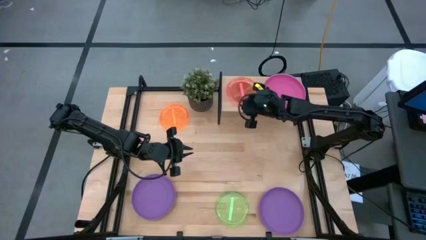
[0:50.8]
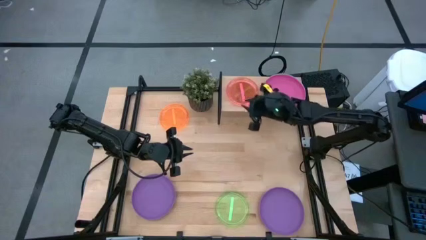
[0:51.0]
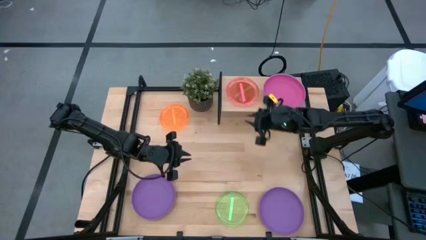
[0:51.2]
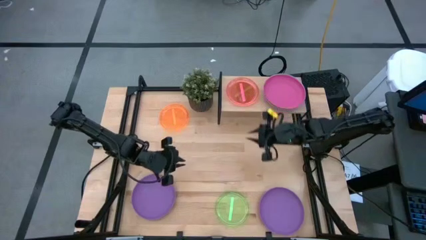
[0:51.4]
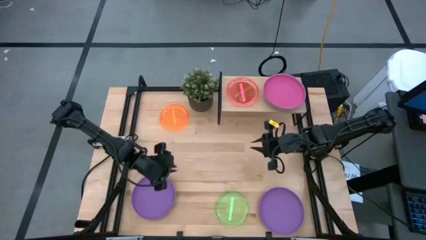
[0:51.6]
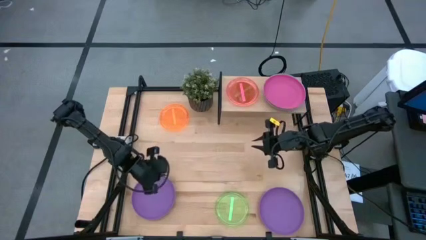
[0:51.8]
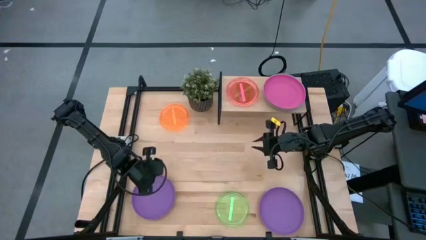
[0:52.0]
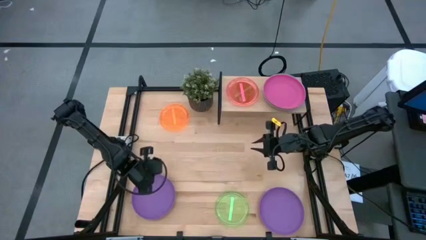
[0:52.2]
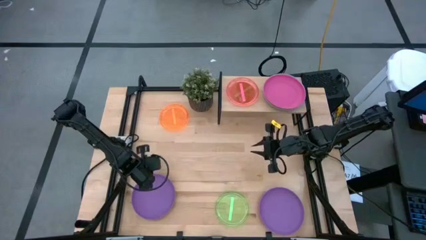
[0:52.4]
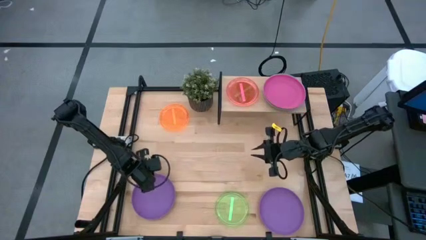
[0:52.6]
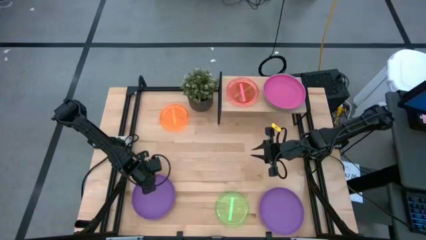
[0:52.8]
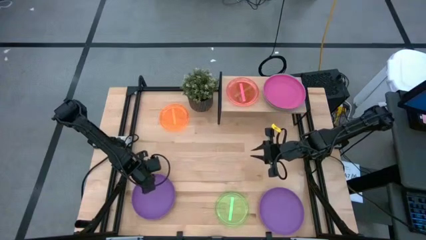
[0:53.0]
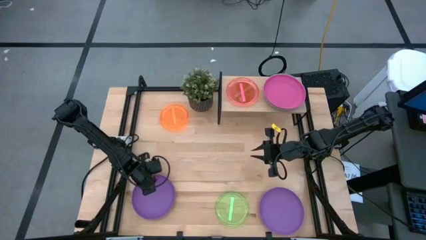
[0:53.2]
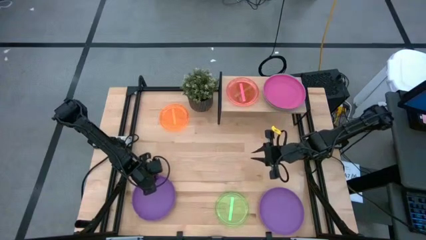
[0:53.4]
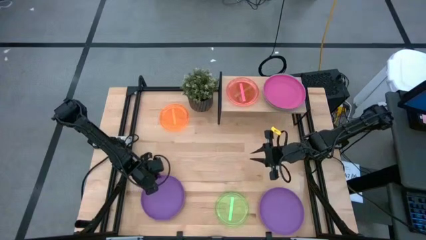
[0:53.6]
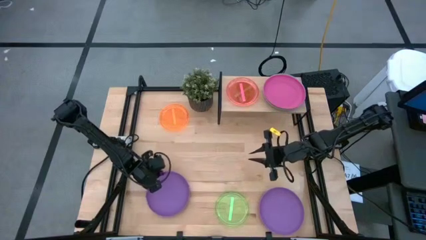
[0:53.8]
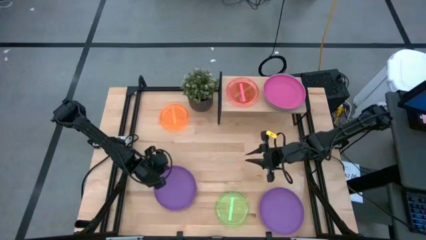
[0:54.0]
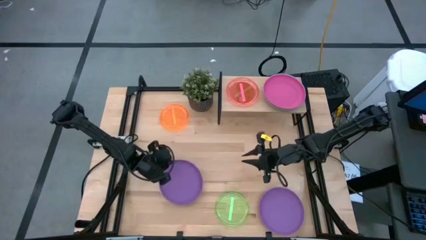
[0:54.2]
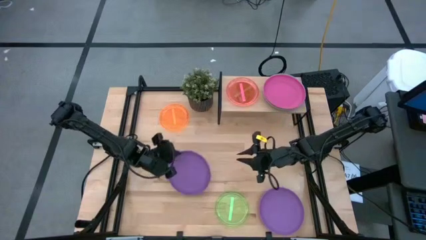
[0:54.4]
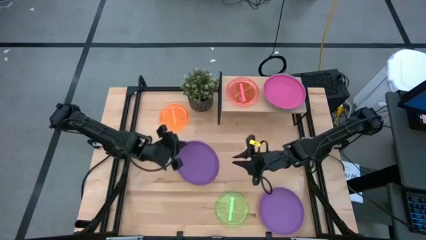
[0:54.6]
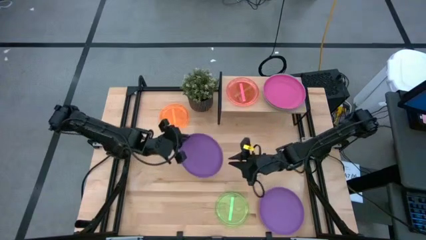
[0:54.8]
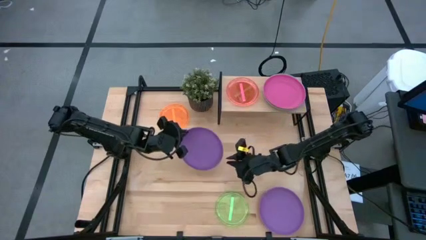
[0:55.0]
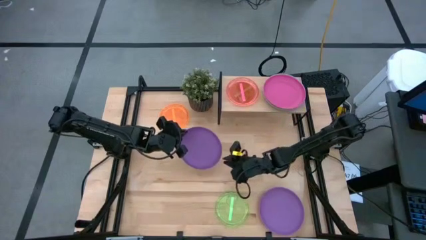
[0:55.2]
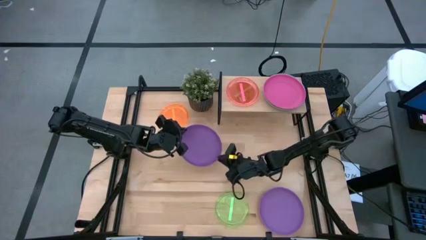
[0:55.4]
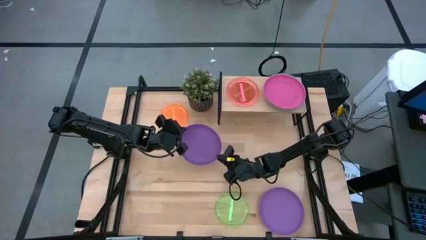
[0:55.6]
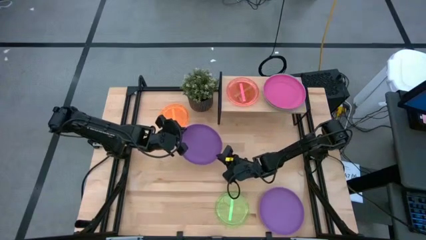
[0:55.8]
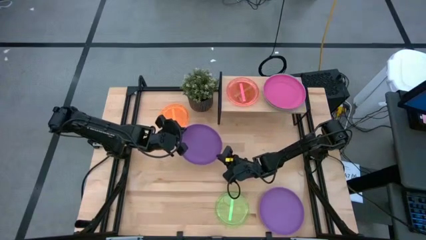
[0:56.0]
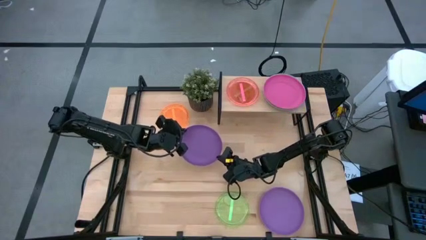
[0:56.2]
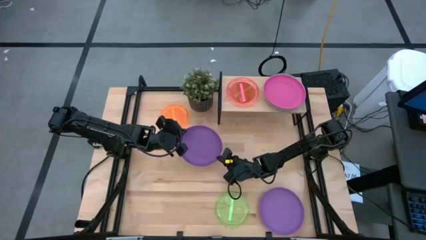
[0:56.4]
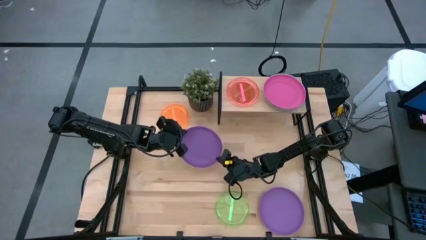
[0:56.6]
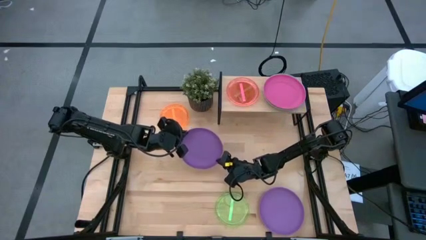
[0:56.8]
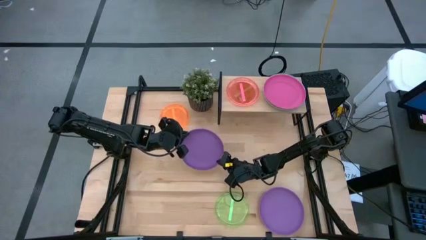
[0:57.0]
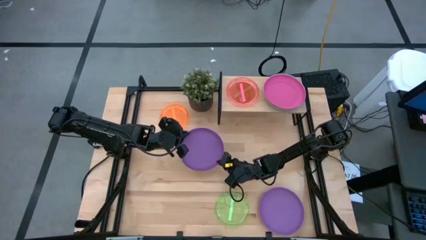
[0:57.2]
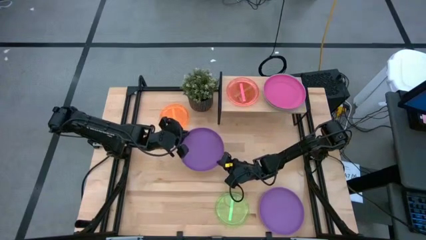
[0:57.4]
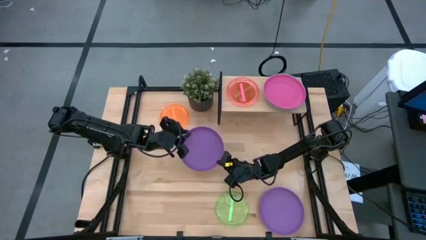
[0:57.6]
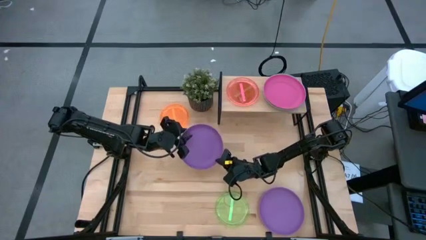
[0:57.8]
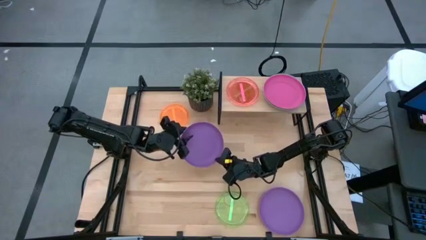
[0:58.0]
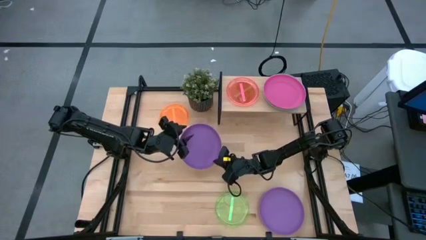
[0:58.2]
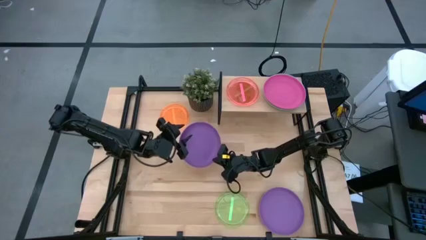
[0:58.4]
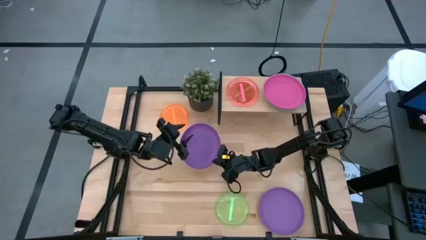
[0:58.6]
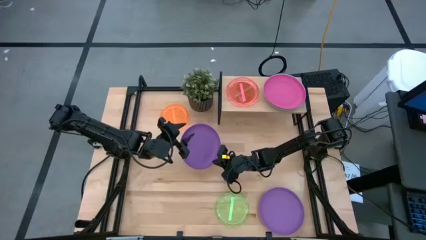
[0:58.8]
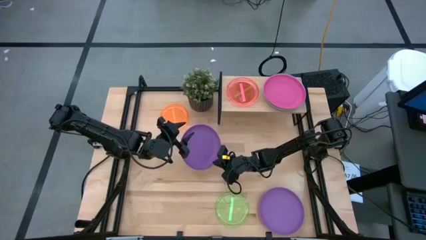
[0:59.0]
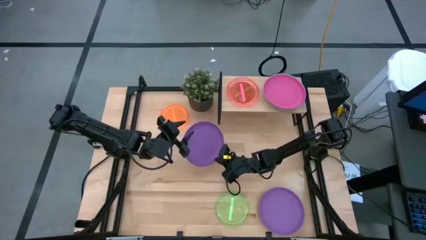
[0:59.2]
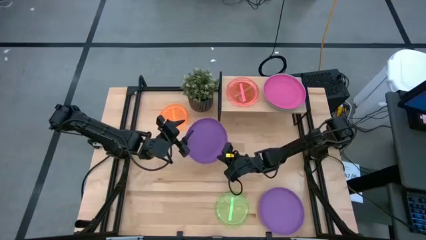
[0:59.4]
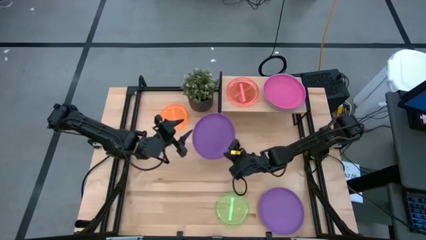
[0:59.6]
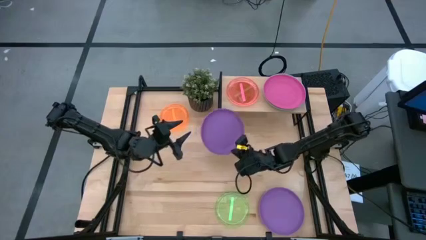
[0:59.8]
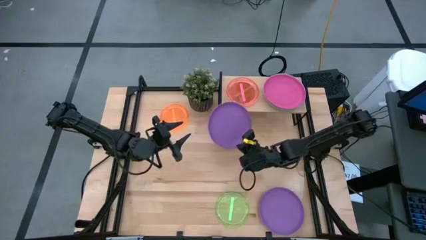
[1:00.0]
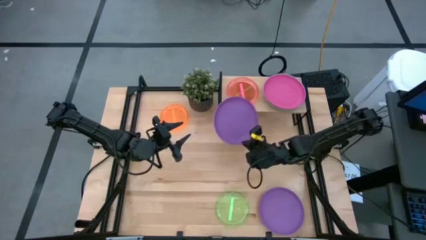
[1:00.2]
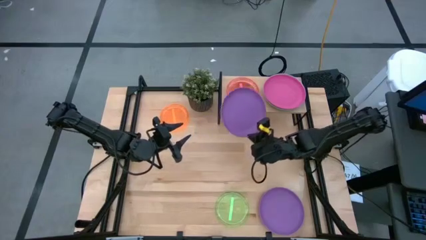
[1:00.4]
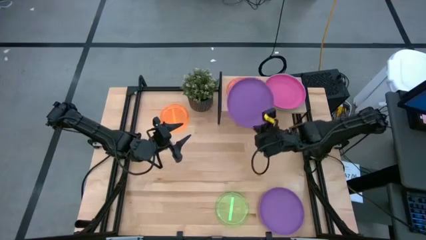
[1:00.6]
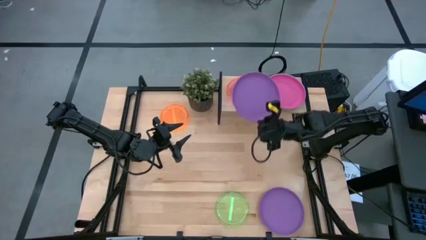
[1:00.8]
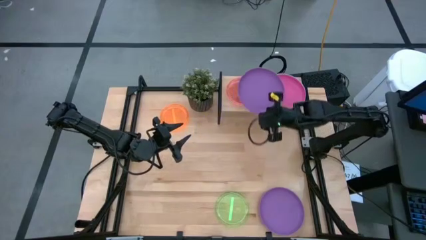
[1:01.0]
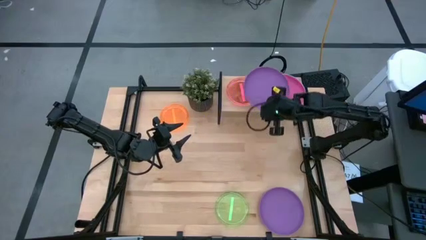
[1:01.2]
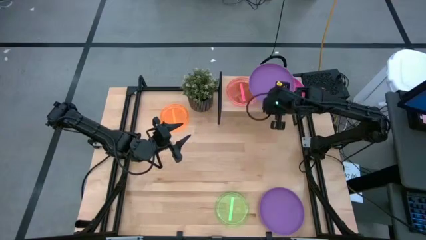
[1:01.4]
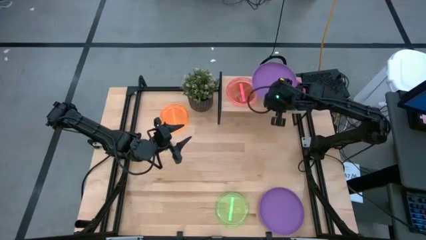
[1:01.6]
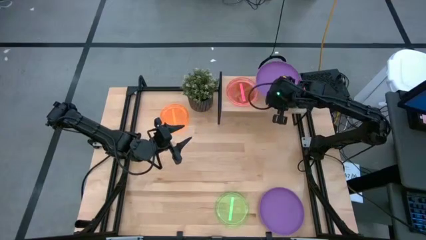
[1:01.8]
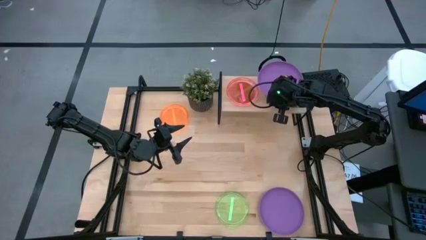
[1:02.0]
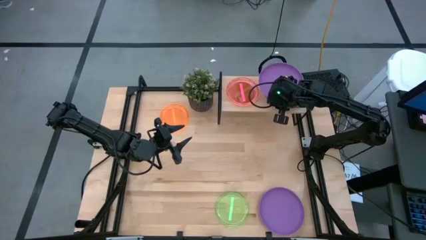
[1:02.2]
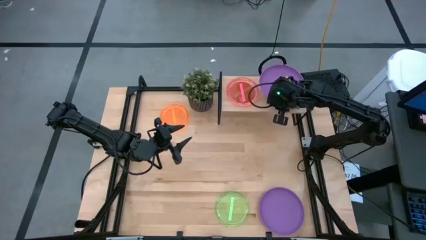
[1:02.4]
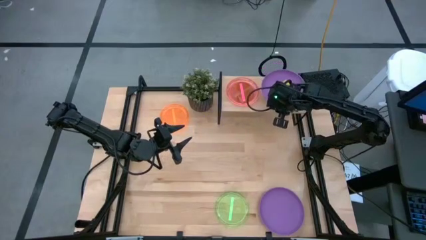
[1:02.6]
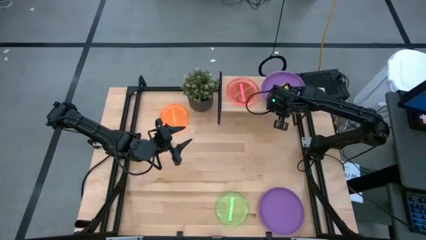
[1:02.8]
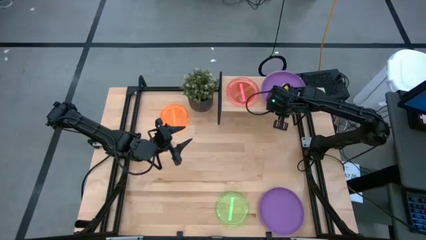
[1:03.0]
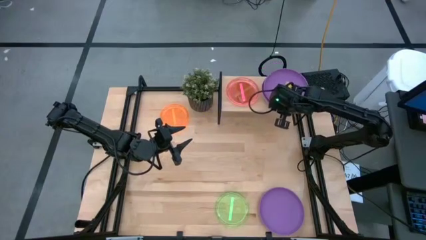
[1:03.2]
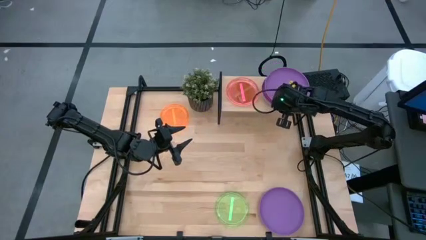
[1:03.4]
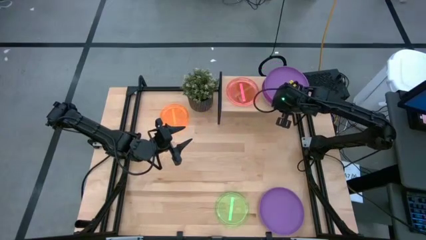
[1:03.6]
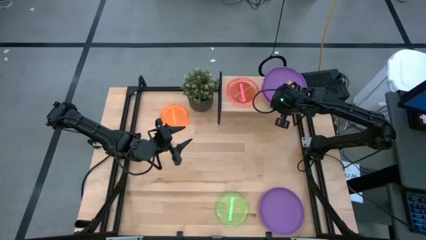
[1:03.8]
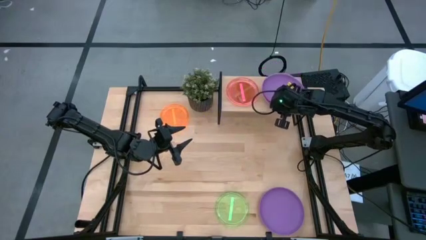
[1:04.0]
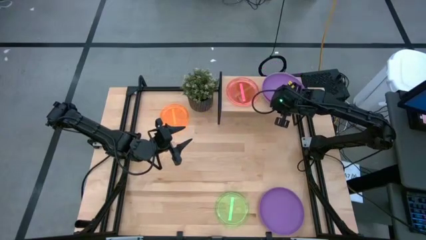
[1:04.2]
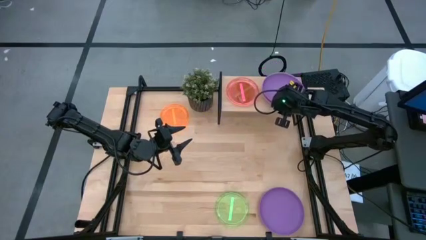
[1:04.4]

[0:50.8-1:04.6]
Task: Place and stack plates onto a shelf
Stack the left purple plate on top of the pink plate on the shelf

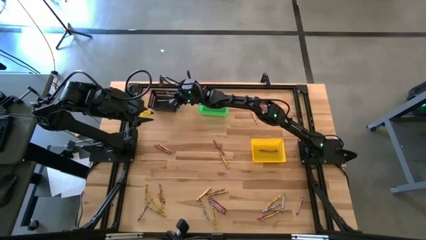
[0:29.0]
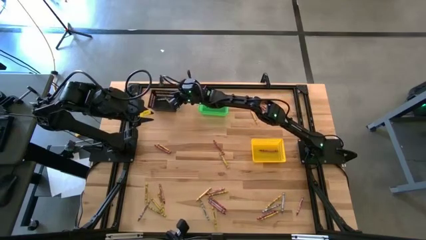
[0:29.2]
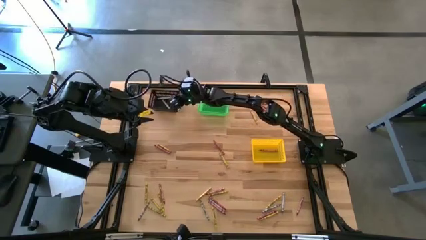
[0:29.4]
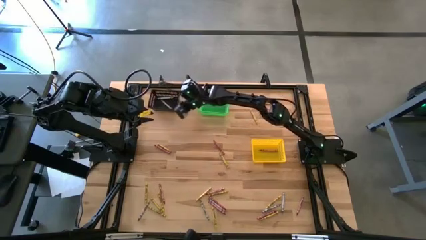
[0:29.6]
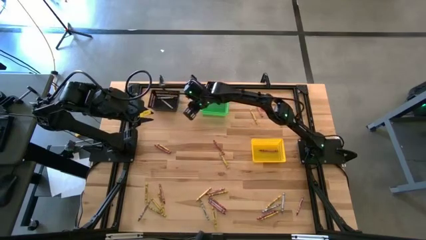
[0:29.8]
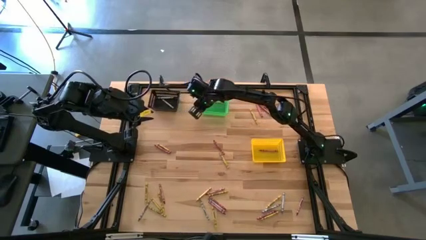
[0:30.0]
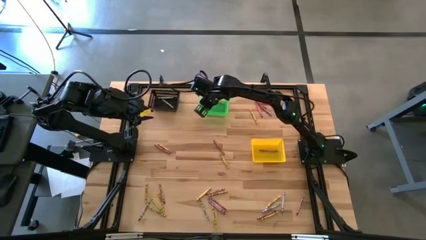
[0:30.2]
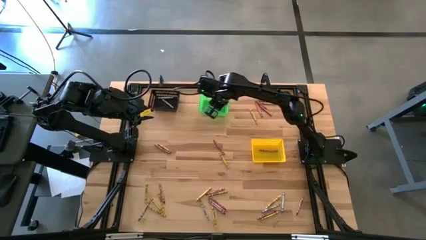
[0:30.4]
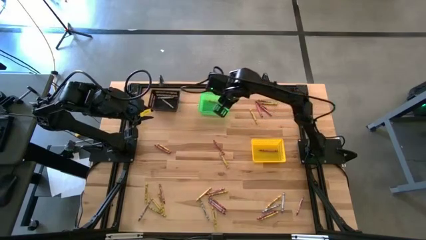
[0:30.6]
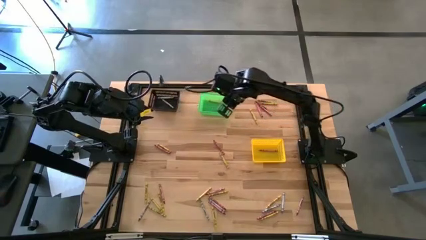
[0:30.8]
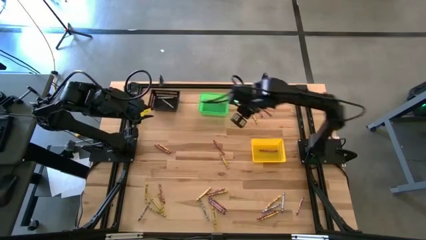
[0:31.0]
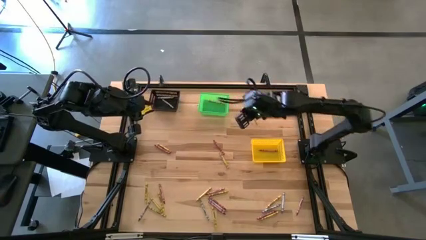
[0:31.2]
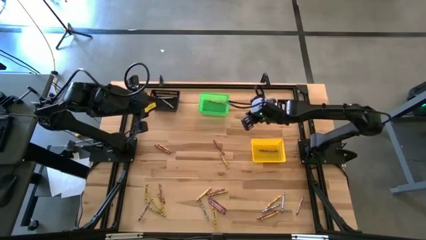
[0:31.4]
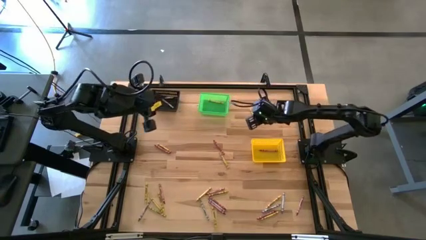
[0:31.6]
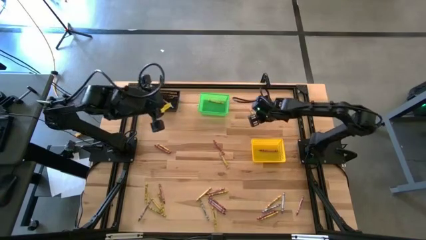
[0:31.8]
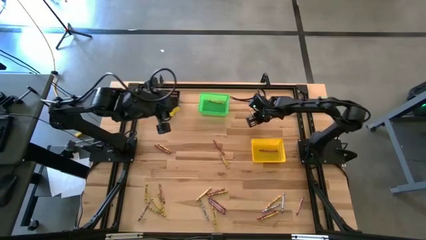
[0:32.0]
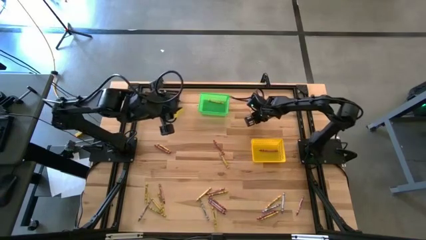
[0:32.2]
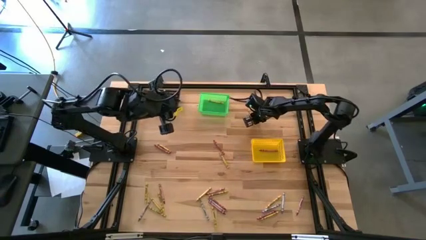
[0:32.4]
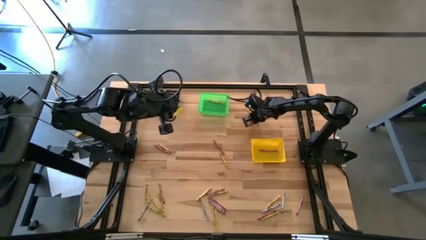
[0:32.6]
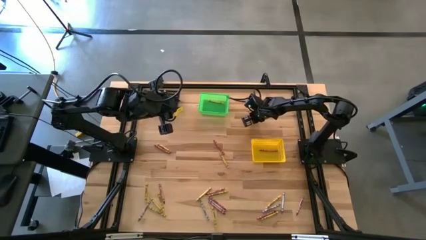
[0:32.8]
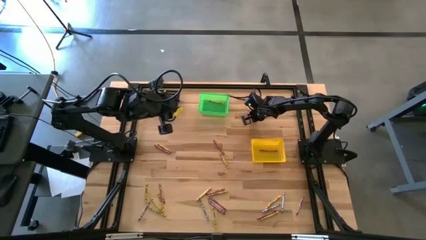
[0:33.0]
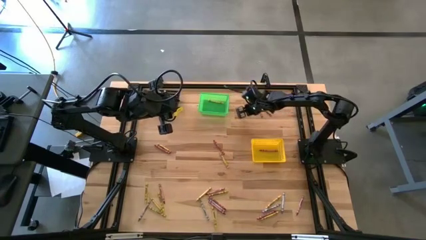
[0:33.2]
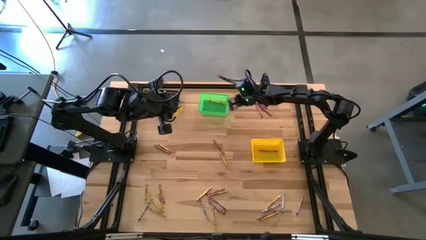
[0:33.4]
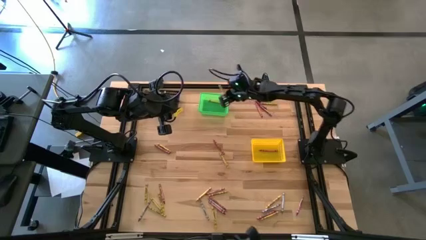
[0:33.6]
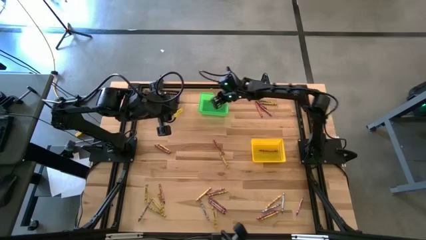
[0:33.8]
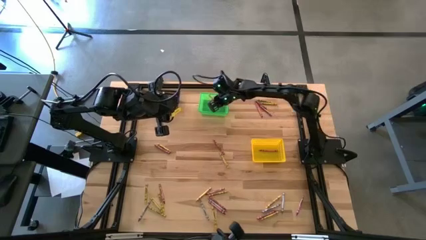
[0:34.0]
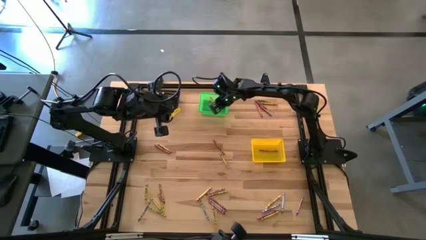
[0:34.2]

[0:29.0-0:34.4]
Task: Sort crayons
Put the yellow crayon into the green basket
